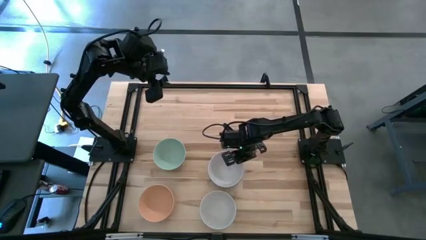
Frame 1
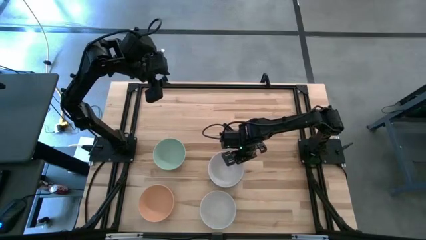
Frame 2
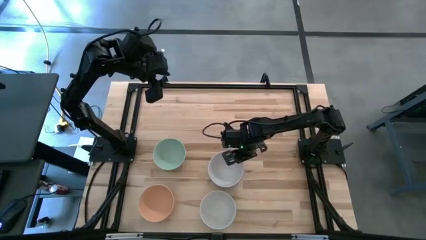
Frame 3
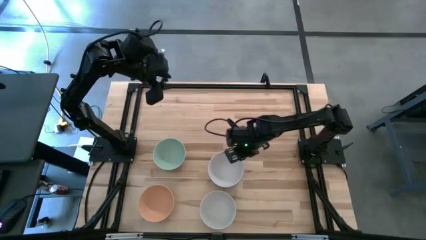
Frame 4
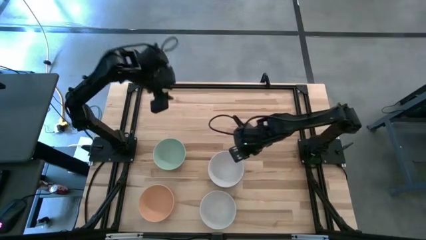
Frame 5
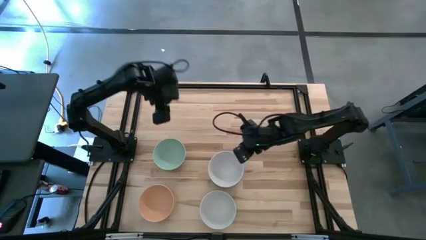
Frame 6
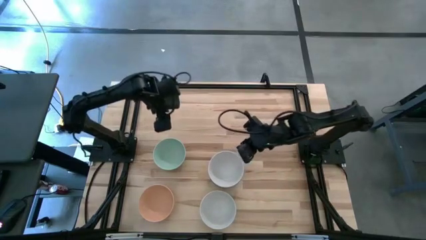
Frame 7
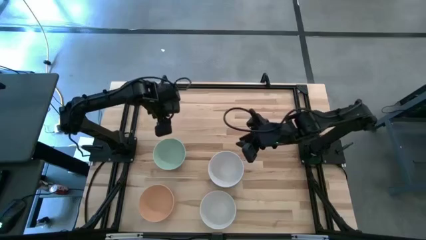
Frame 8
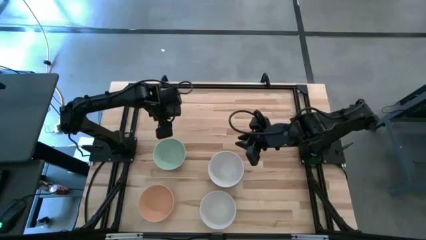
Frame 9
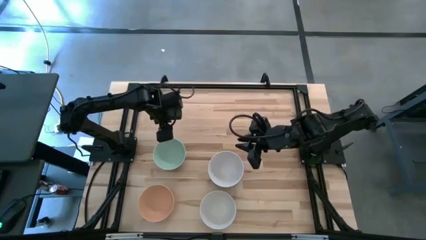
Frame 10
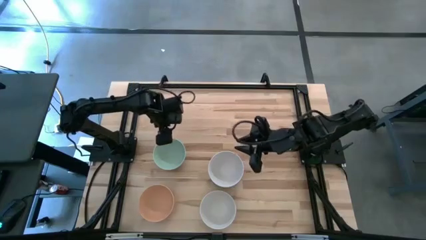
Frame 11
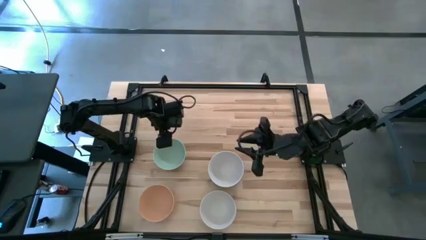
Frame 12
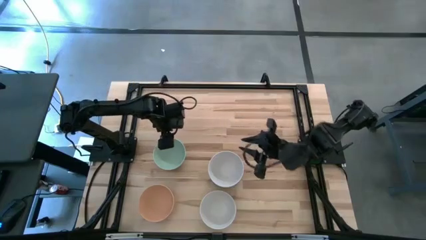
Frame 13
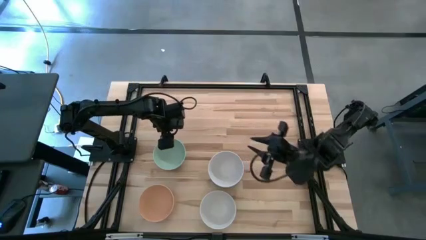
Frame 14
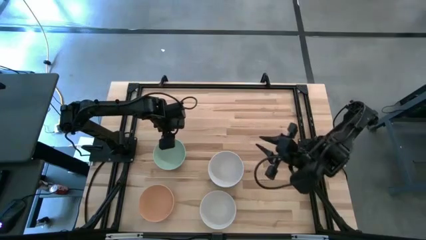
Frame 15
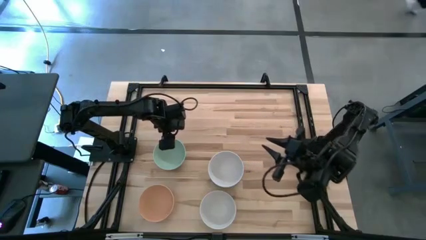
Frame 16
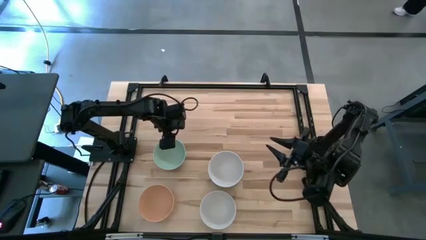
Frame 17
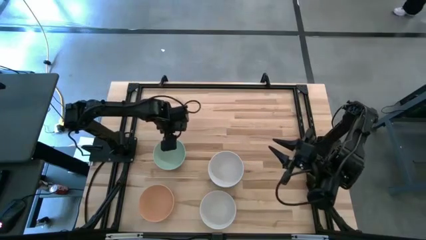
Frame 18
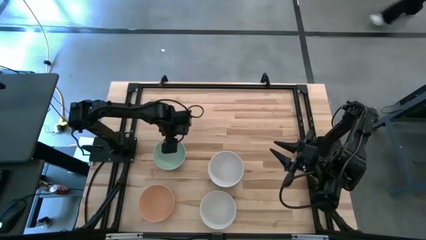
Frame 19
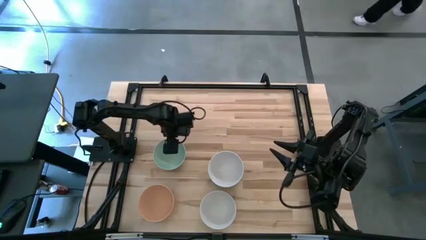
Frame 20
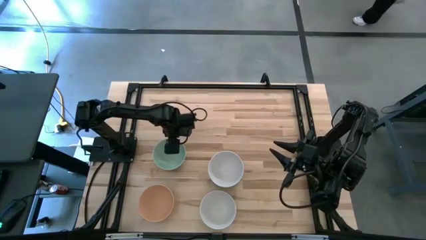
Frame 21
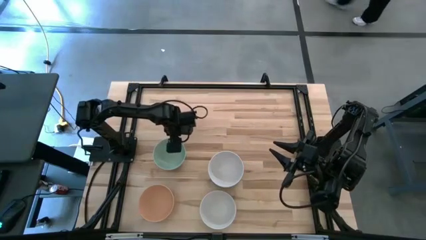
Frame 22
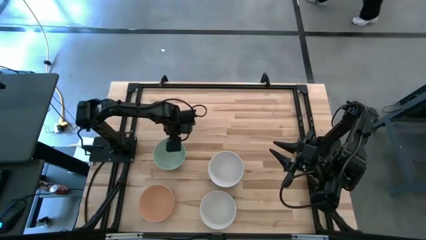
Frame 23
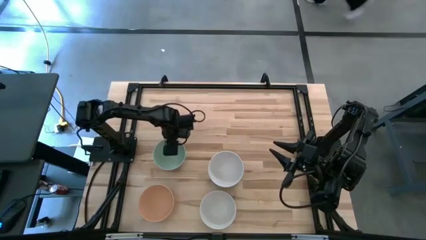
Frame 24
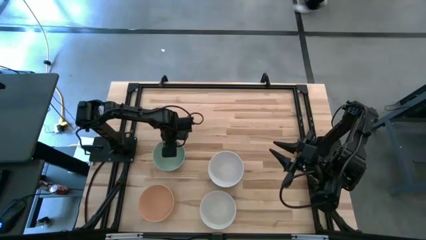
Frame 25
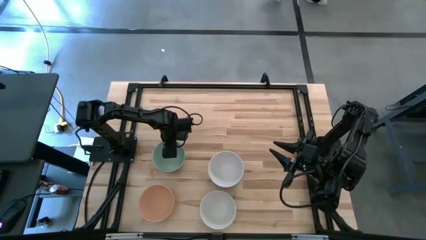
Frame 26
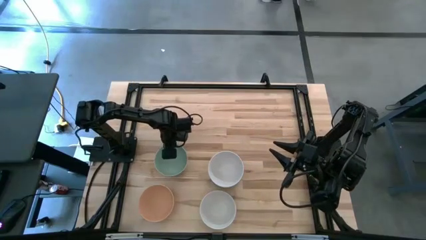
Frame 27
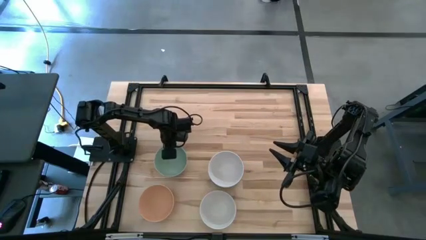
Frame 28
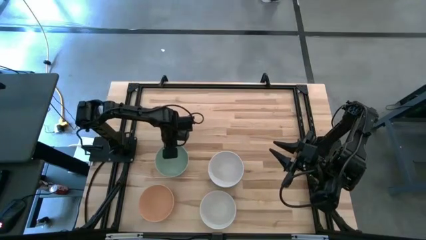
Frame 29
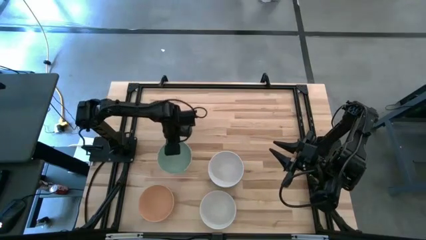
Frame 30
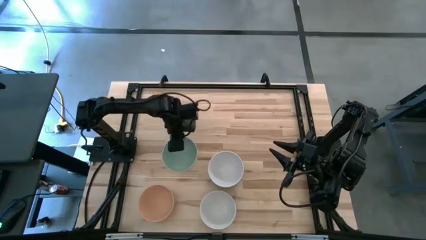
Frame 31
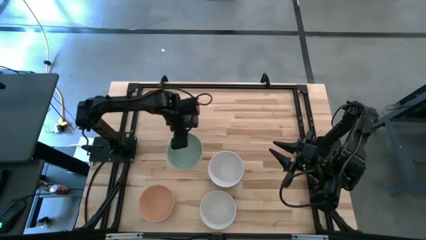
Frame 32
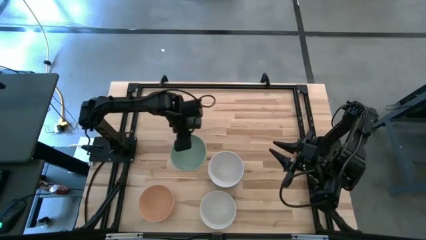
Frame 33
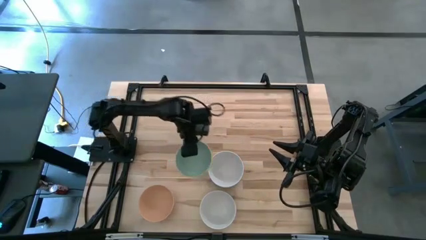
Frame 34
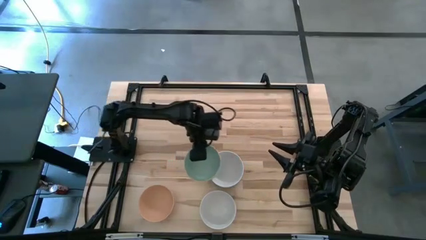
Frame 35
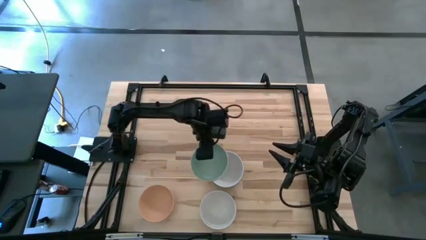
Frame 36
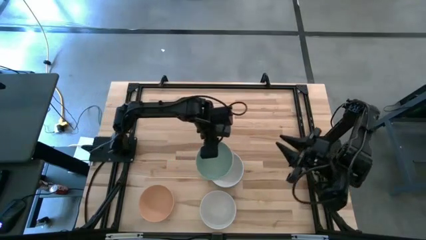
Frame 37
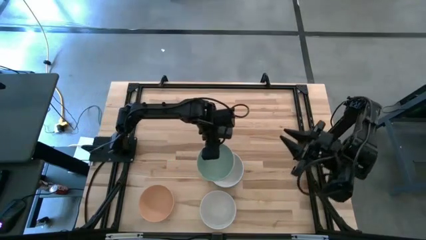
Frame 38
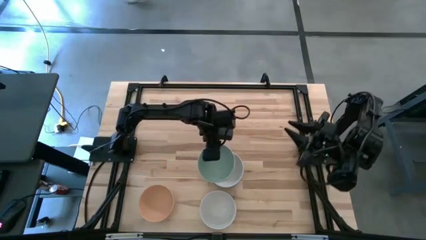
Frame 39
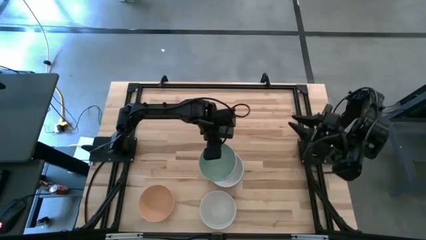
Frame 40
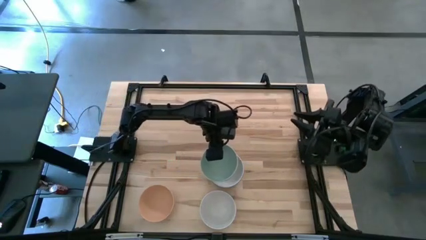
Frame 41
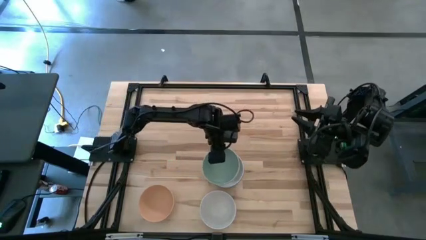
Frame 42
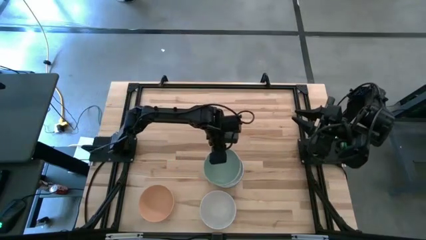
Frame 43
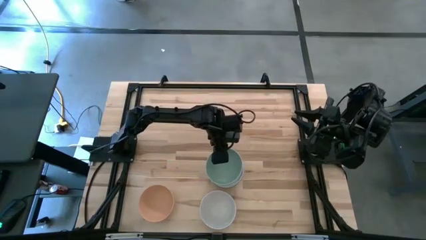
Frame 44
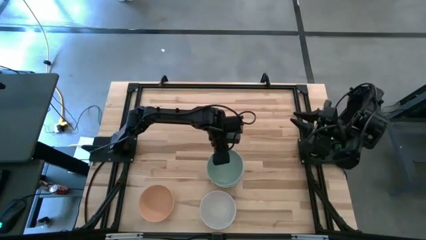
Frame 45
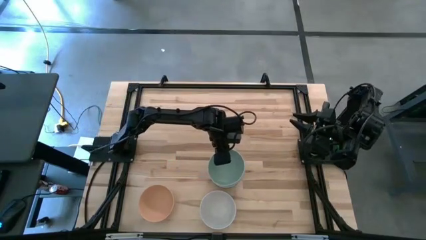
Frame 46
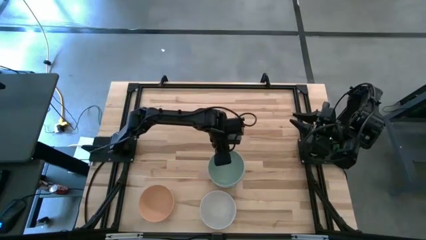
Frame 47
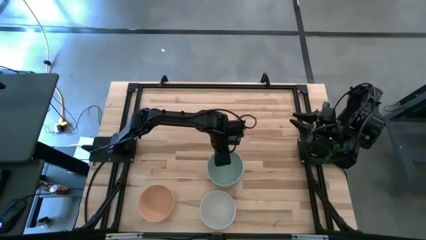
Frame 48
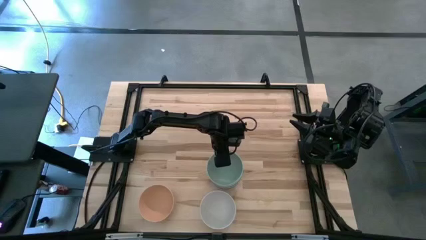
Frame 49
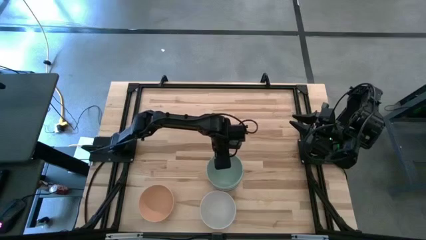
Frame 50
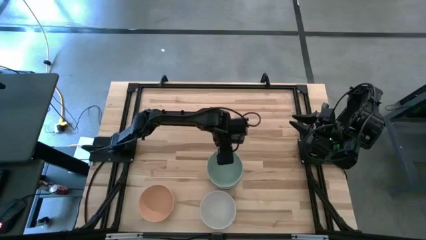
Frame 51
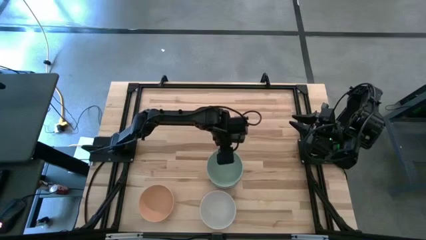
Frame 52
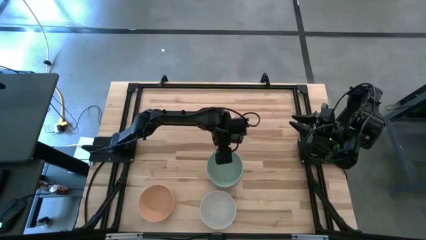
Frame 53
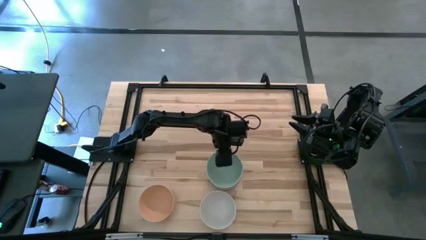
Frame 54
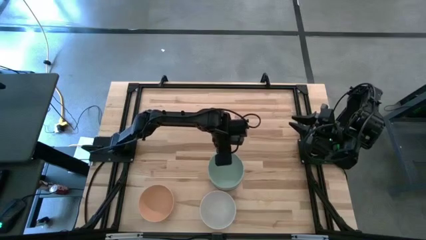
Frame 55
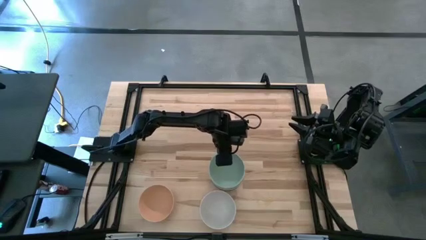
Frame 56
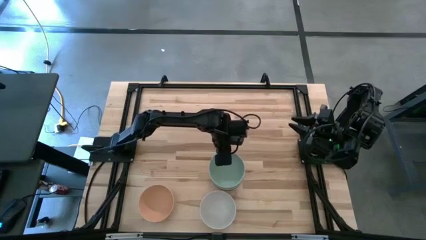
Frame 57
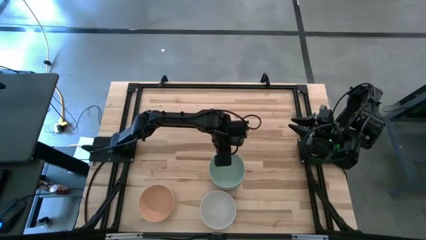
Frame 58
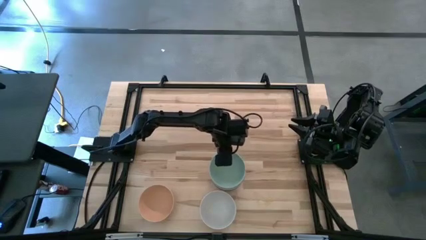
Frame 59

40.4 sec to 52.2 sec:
Task: Nest bowls inside each other
Stack the light blue bowl on top of the white bowl
